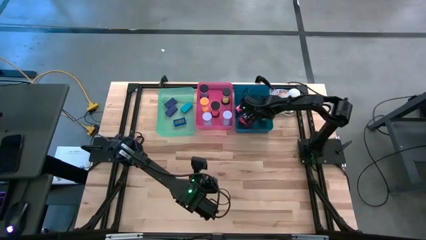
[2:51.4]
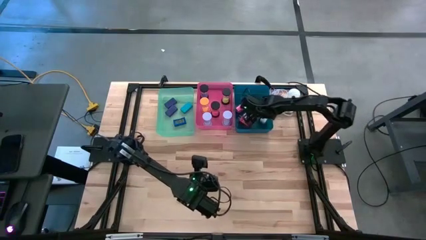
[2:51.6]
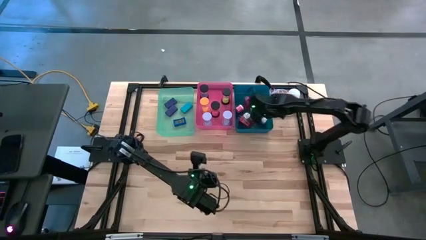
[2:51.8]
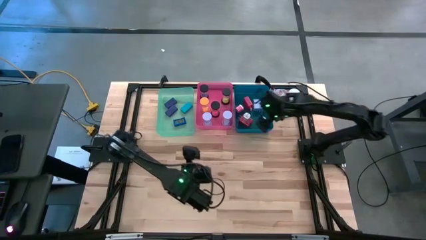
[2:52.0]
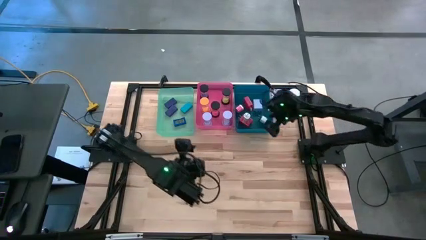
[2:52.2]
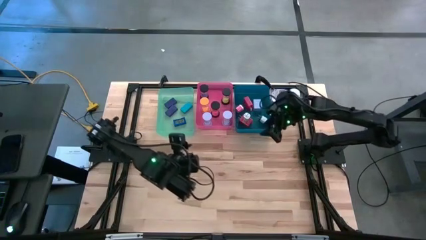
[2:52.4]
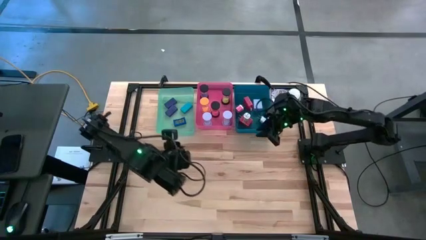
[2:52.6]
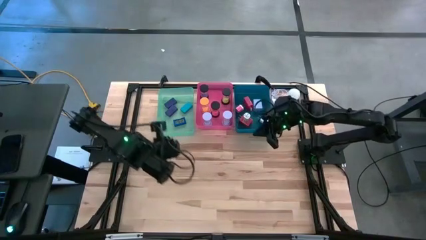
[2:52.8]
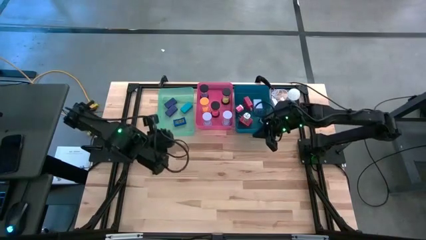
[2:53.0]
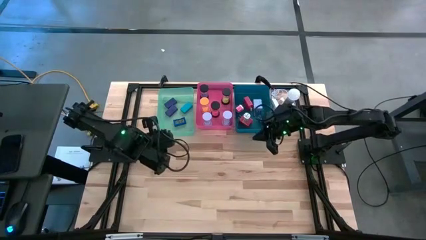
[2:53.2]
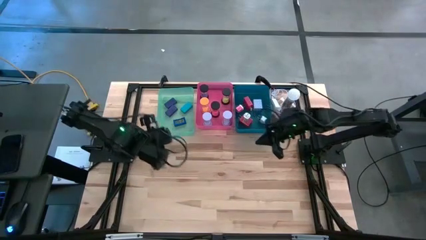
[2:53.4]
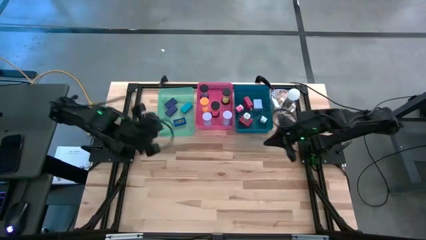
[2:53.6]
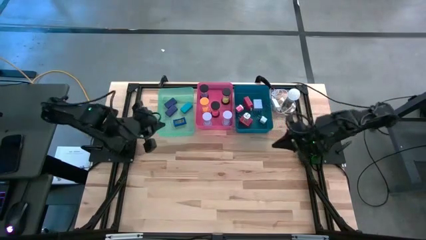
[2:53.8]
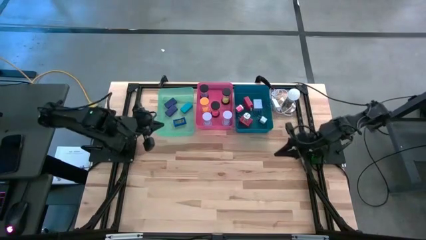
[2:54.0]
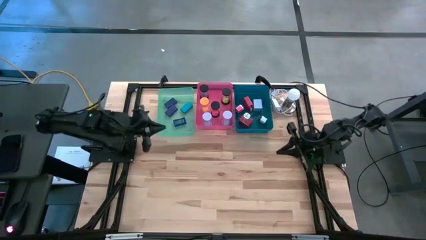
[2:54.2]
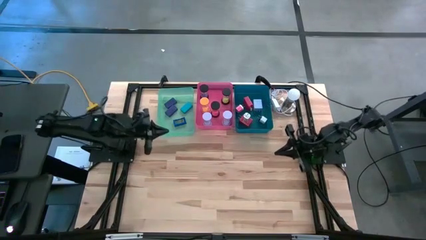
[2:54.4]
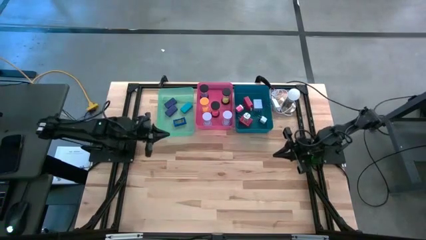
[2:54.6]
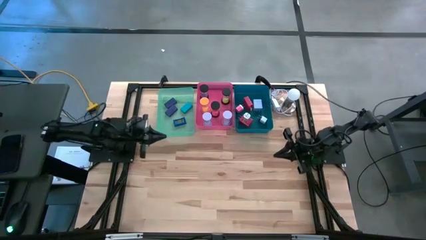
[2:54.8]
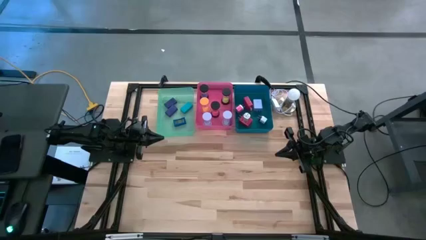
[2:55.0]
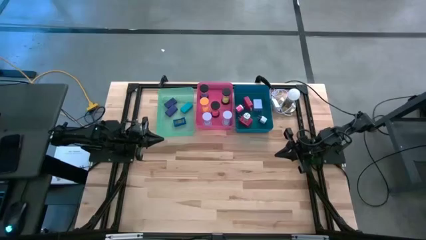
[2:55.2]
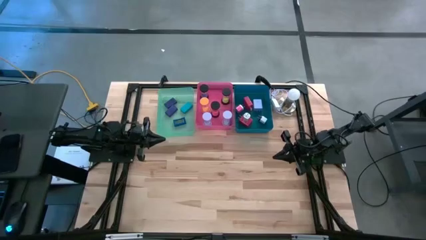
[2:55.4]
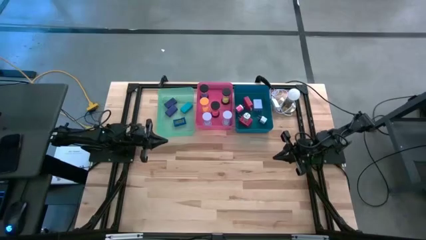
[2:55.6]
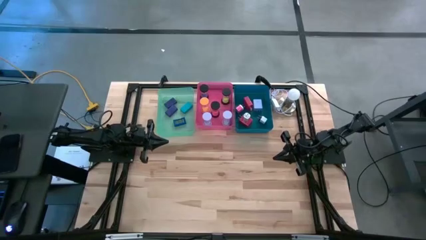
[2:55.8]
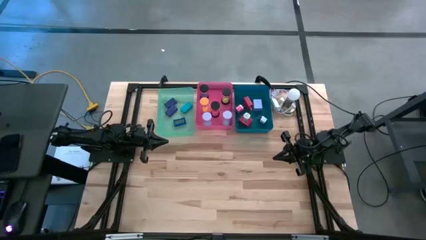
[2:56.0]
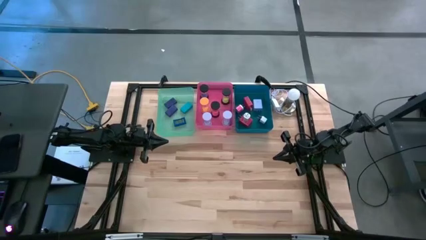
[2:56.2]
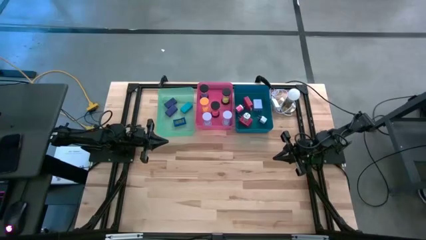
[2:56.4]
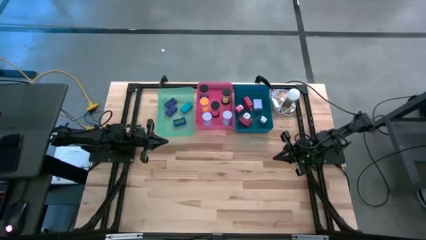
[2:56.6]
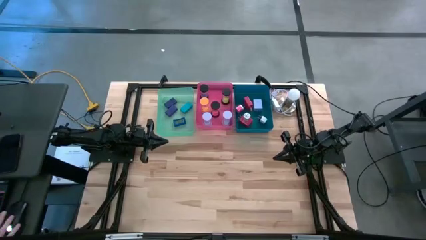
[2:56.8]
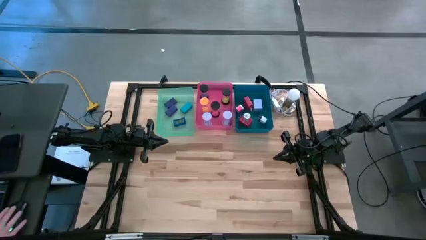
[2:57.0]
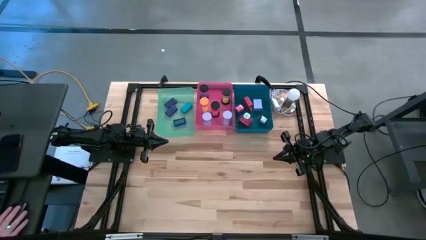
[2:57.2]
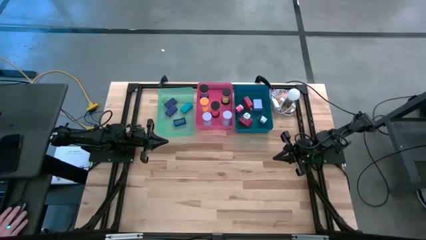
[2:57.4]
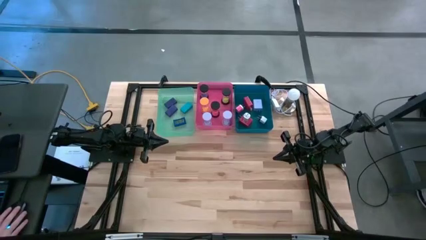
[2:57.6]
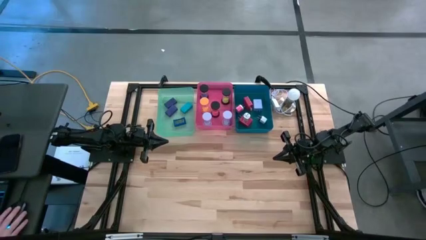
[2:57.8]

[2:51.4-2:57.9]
Task: Pick & Place Office items
Return to Home Position

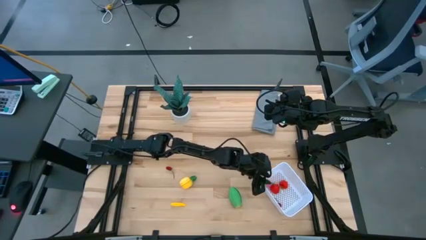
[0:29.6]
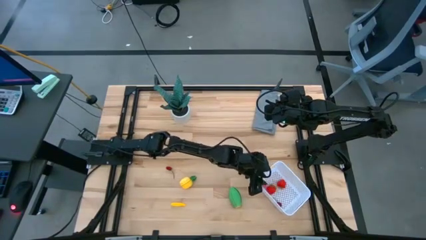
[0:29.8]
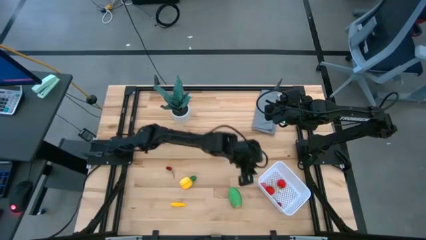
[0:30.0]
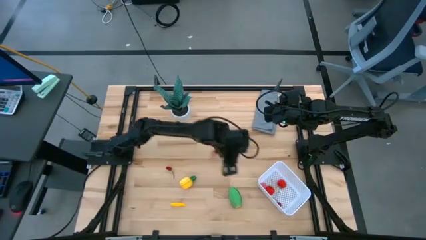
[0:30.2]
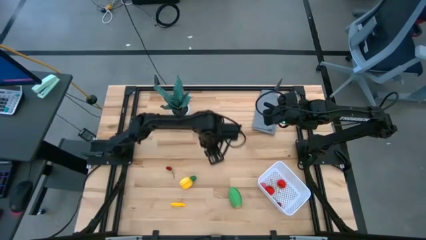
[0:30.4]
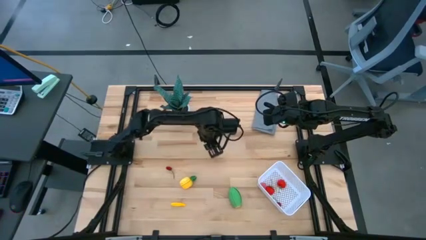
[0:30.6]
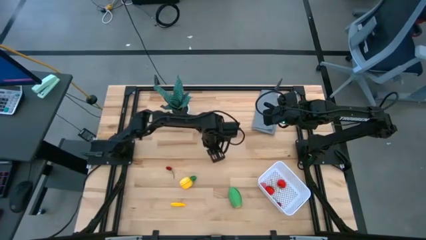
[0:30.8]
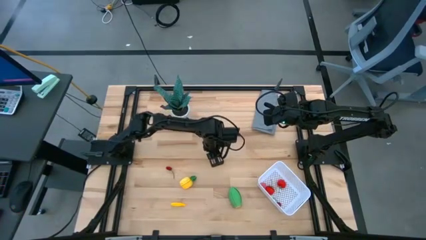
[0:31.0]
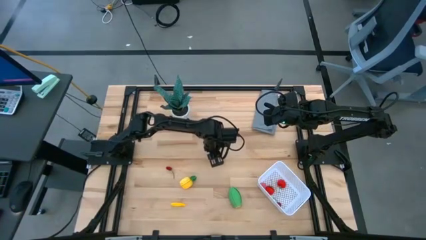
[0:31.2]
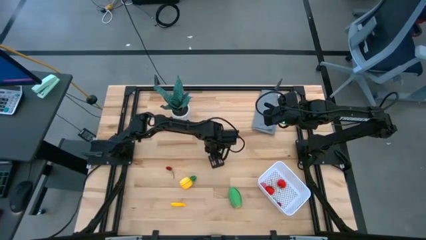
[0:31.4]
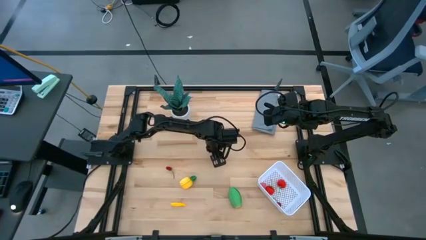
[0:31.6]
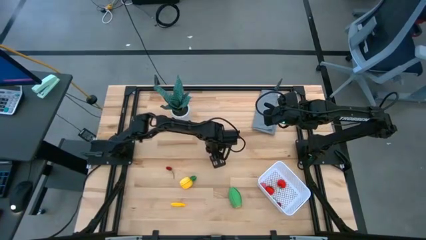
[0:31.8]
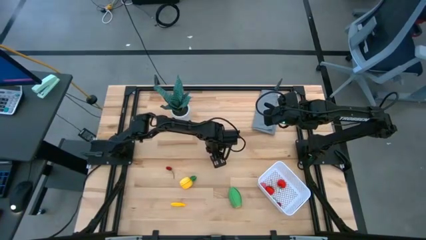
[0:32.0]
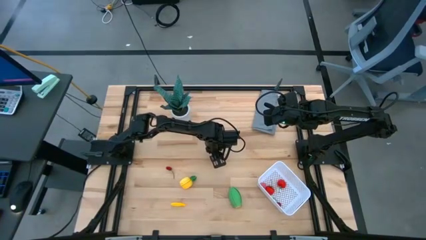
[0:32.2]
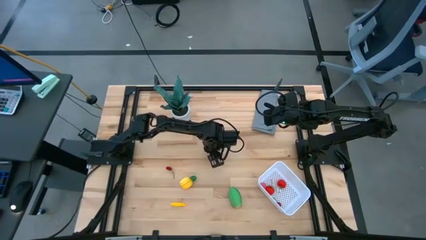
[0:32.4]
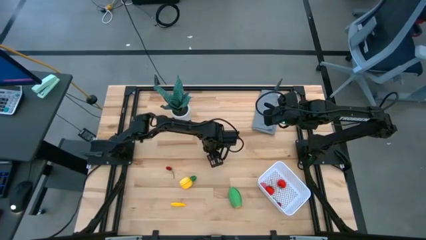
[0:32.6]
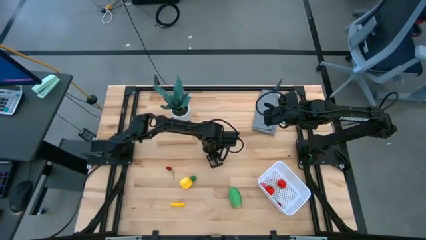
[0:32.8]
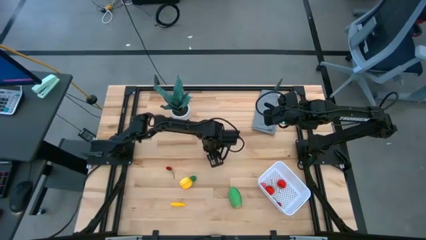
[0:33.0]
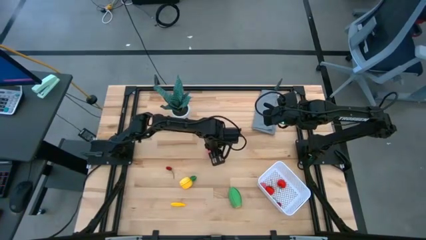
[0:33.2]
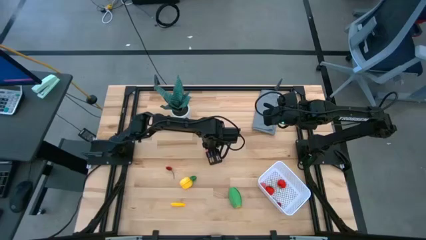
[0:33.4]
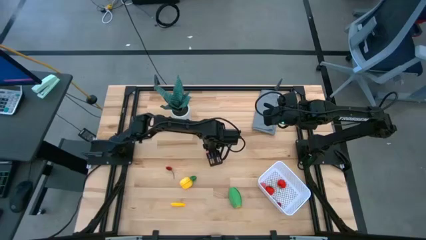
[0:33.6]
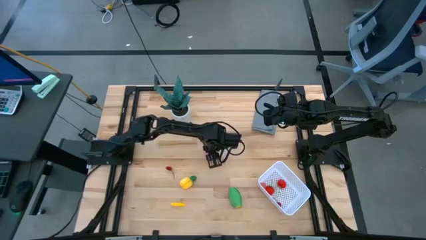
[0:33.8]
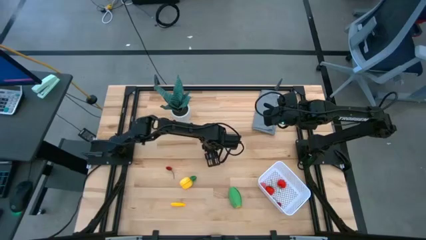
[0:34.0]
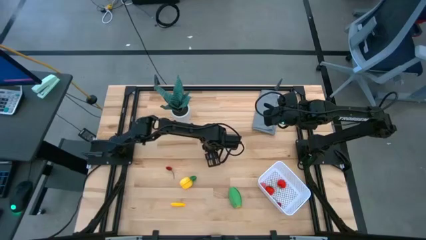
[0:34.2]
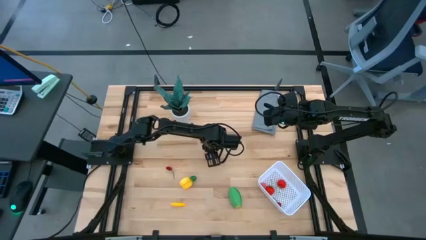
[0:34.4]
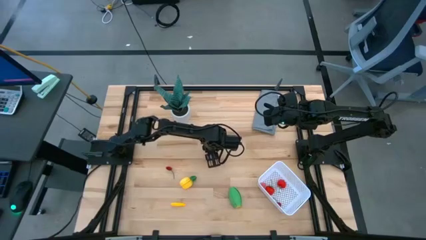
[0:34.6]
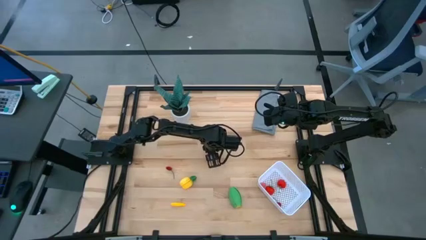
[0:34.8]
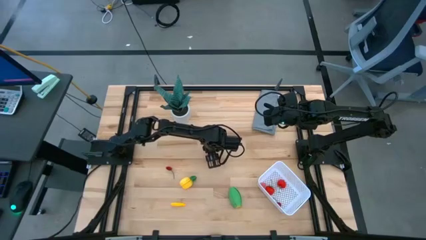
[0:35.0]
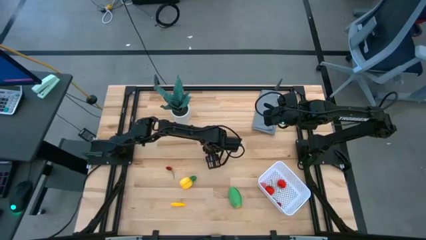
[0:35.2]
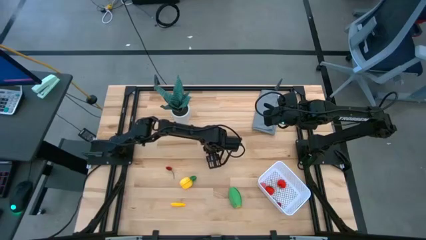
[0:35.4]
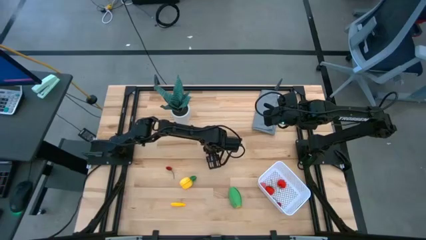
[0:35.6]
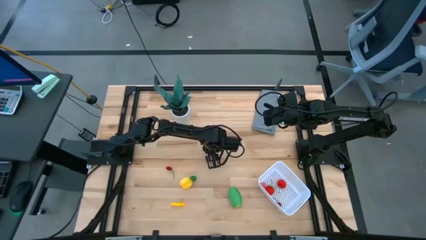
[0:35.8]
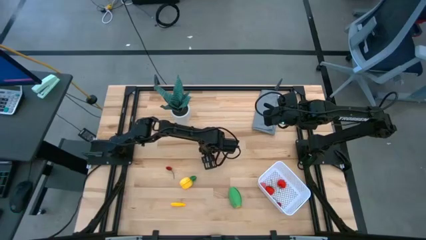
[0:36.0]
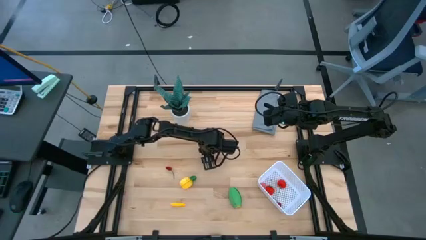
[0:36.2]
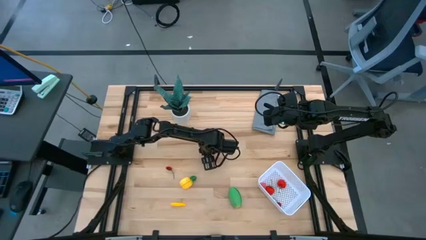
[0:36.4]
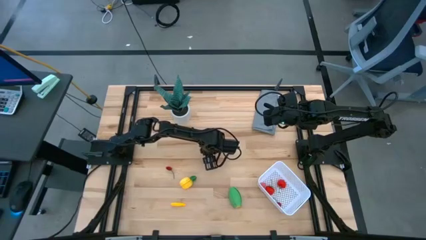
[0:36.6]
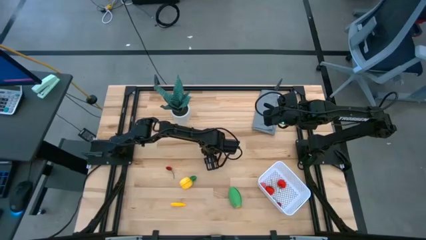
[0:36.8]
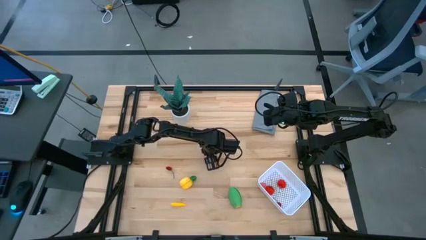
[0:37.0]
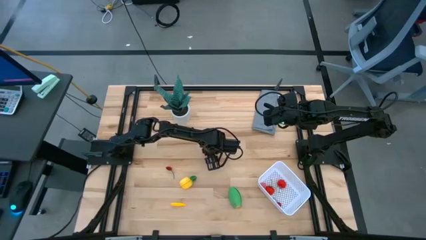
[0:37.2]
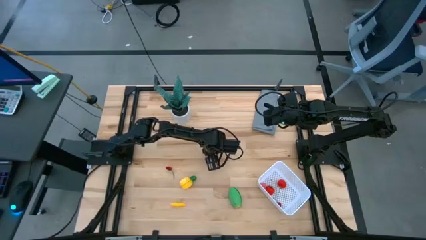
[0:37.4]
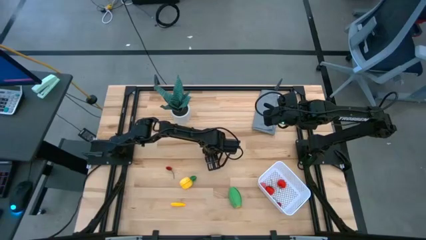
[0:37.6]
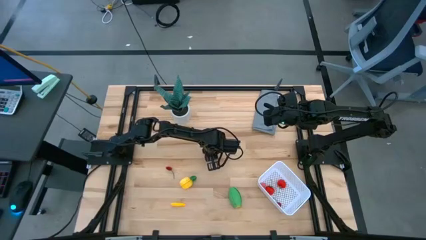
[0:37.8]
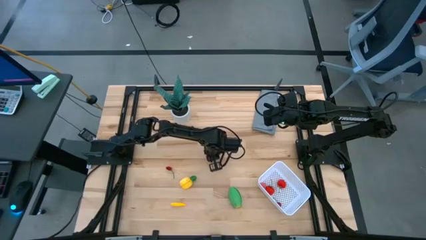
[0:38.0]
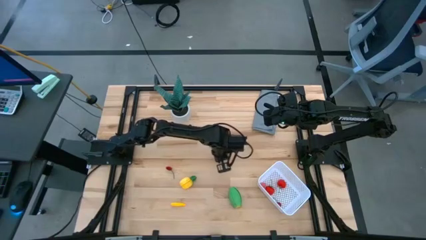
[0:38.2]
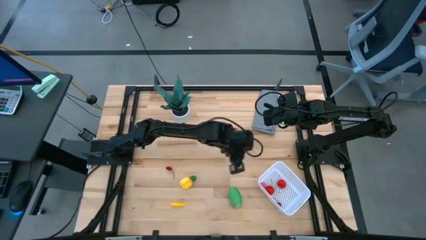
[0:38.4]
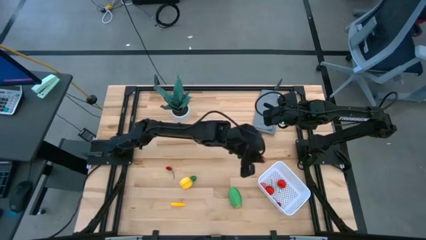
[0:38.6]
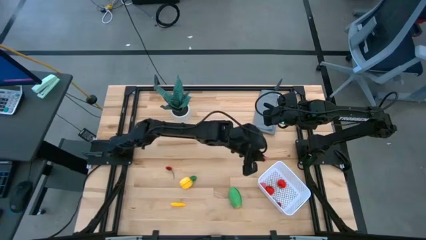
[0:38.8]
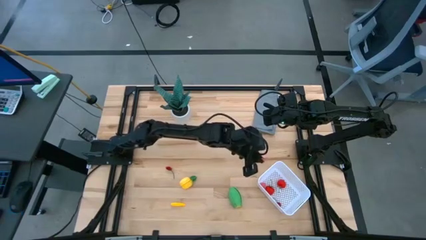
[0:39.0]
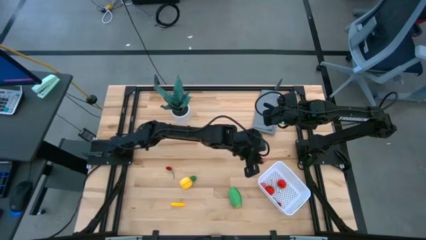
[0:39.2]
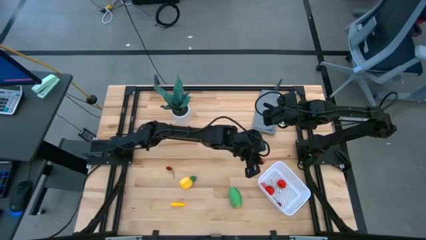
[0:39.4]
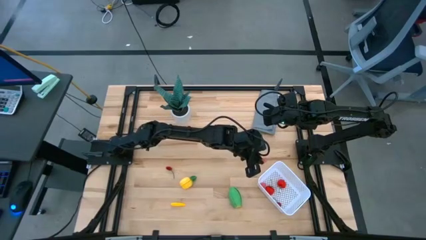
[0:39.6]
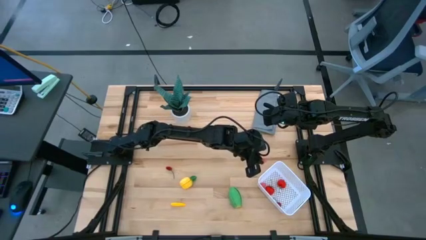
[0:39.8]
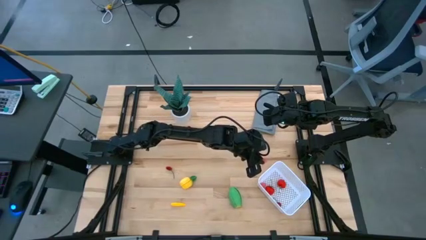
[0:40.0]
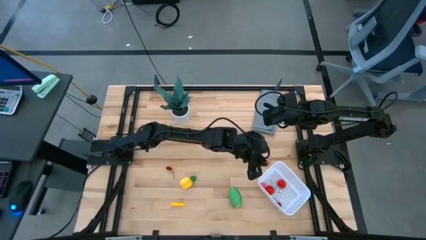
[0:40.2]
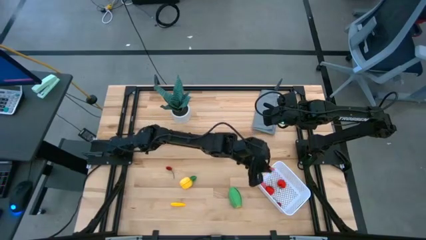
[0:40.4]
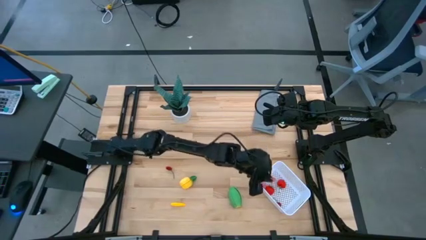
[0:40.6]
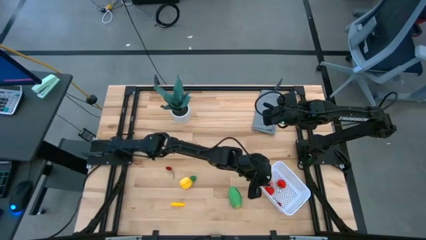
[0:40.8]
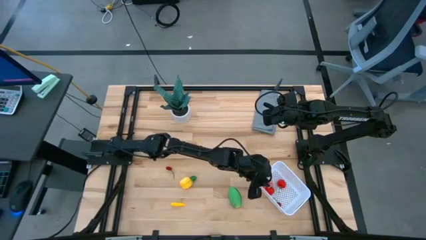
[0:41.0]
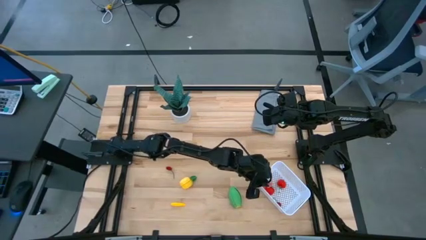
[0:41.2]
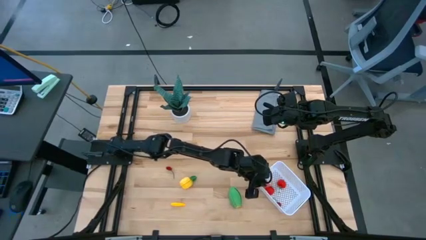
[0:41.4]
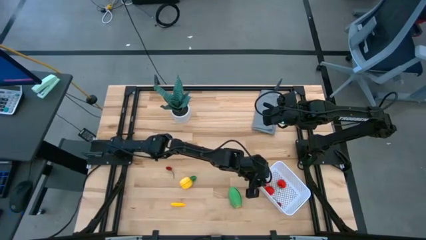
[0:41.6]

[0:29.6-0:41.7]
Task: Pick and placing Produce into tupperware
Put the pink peach into the white basket
